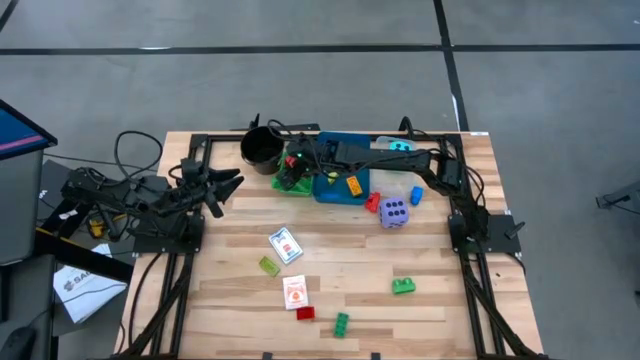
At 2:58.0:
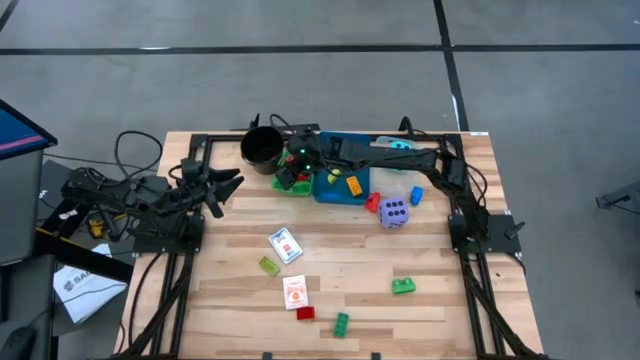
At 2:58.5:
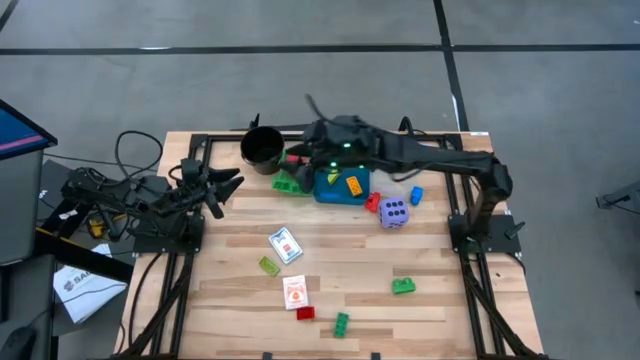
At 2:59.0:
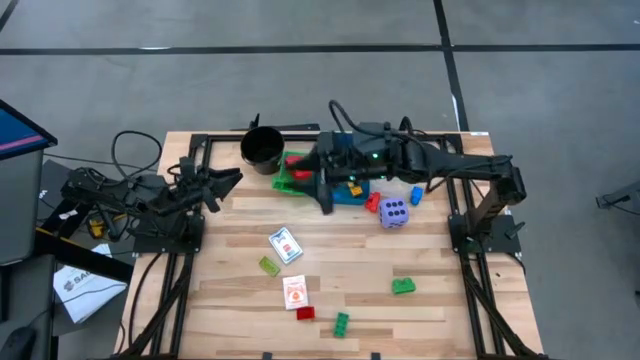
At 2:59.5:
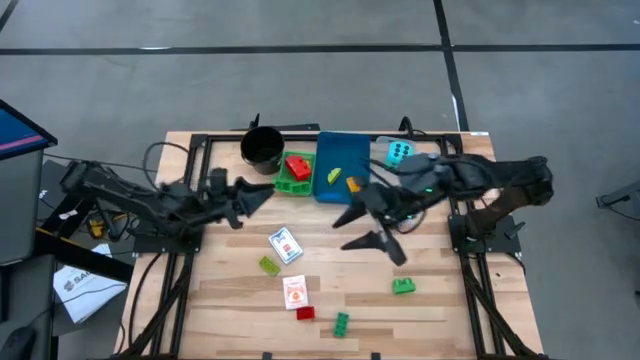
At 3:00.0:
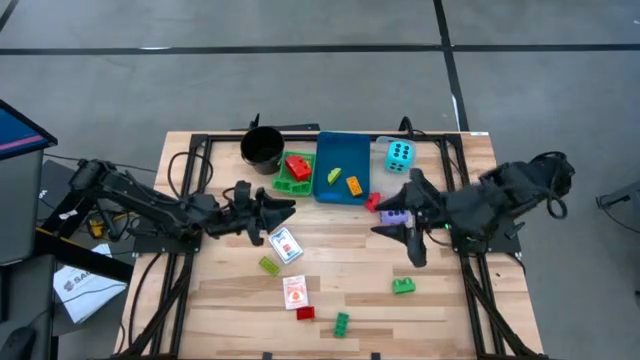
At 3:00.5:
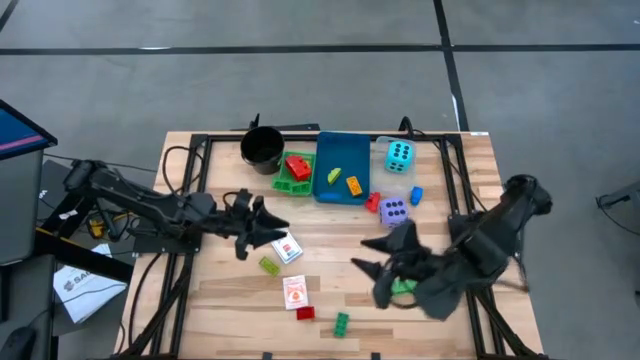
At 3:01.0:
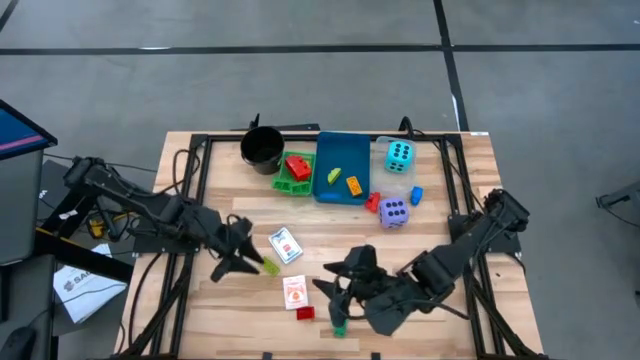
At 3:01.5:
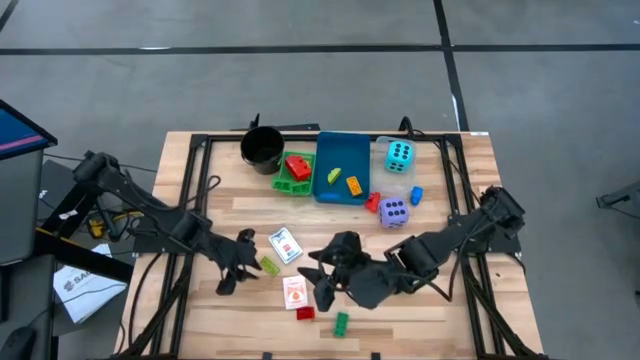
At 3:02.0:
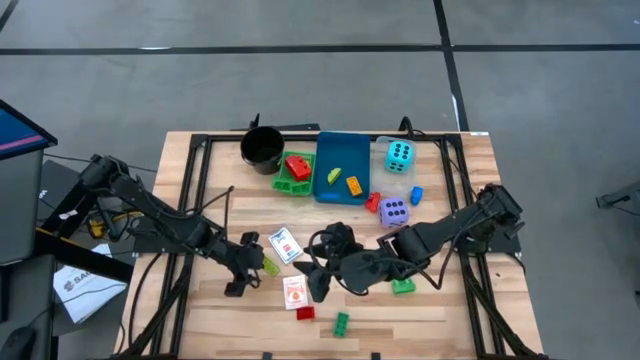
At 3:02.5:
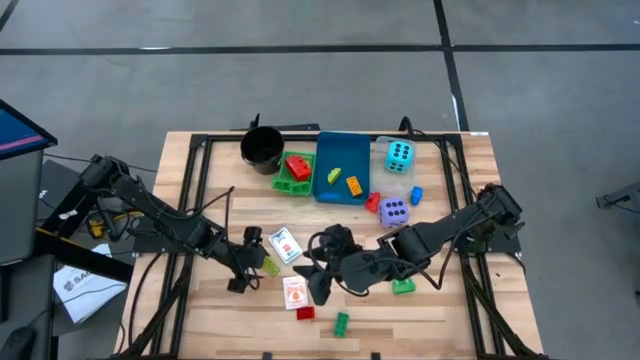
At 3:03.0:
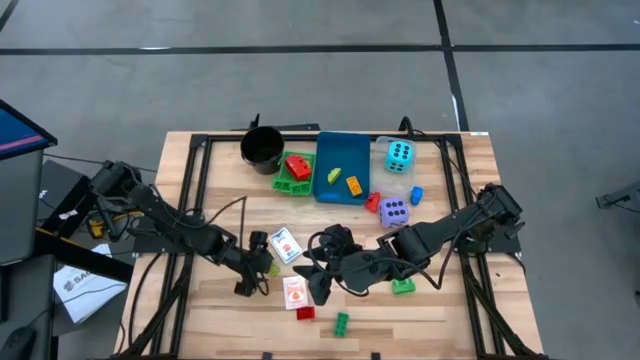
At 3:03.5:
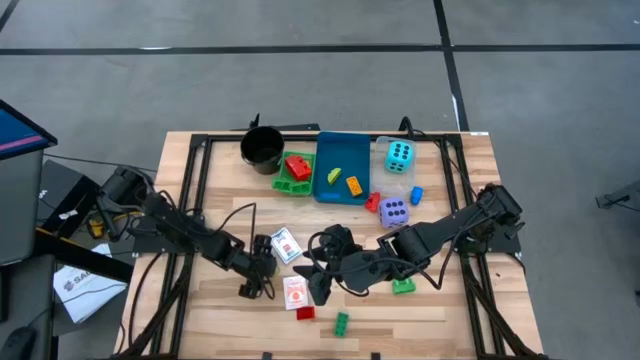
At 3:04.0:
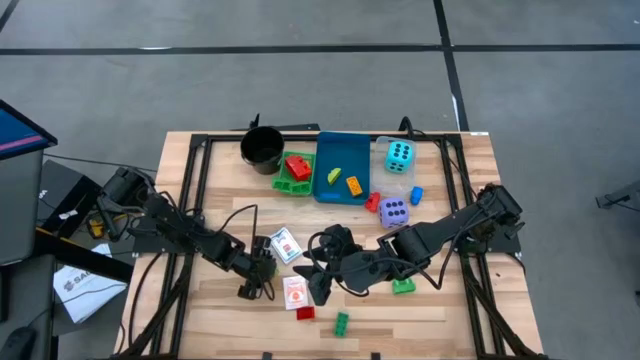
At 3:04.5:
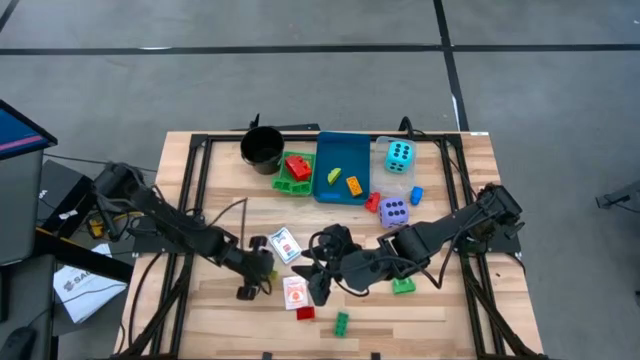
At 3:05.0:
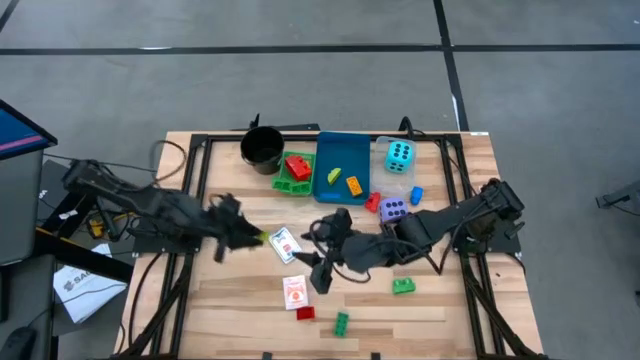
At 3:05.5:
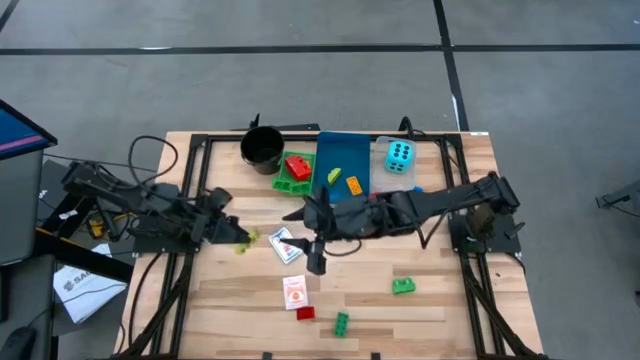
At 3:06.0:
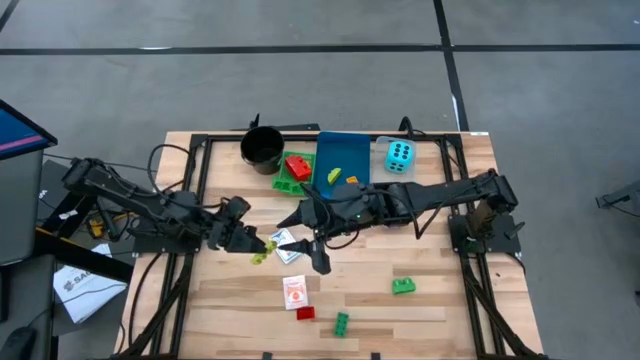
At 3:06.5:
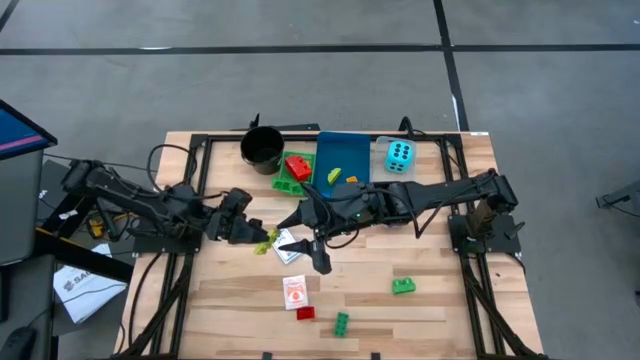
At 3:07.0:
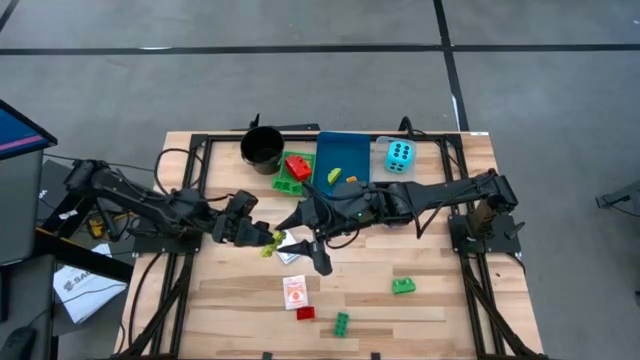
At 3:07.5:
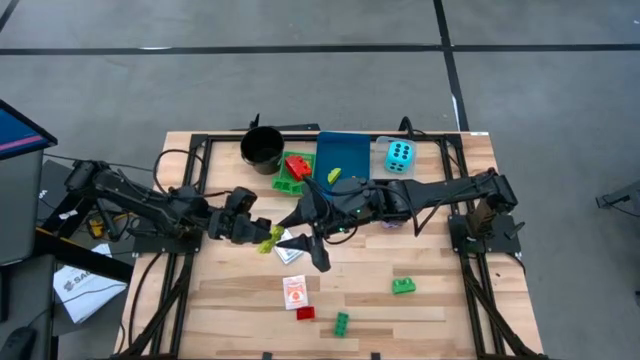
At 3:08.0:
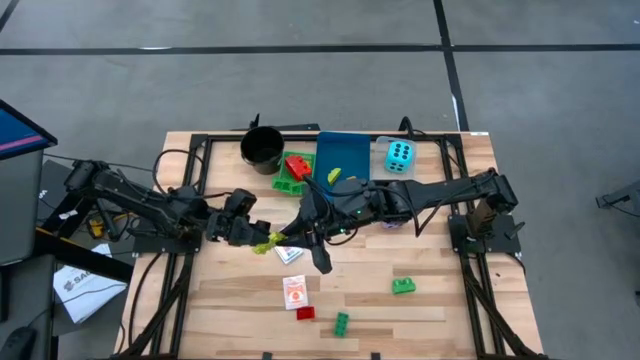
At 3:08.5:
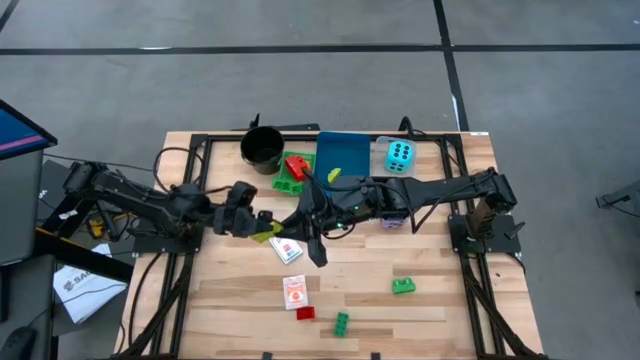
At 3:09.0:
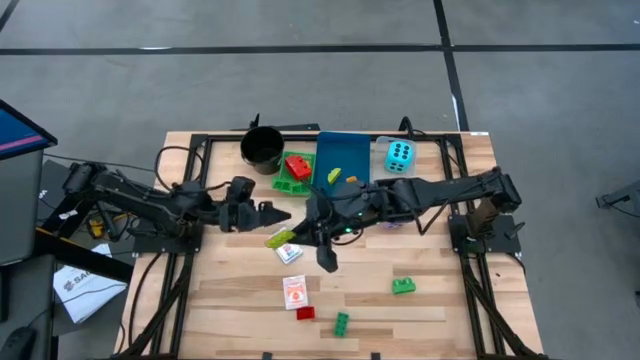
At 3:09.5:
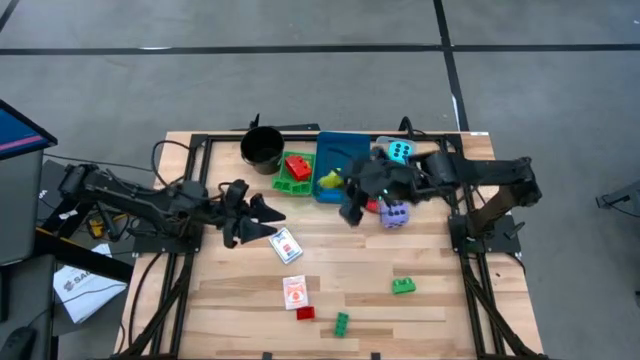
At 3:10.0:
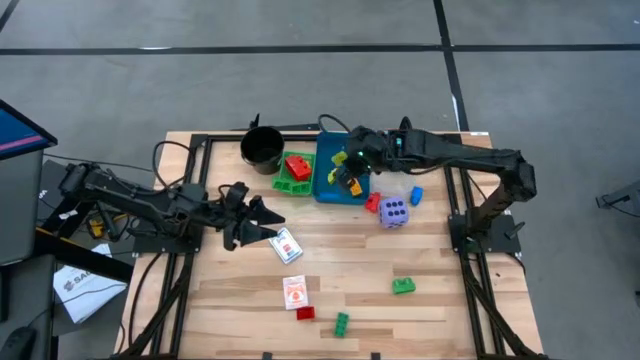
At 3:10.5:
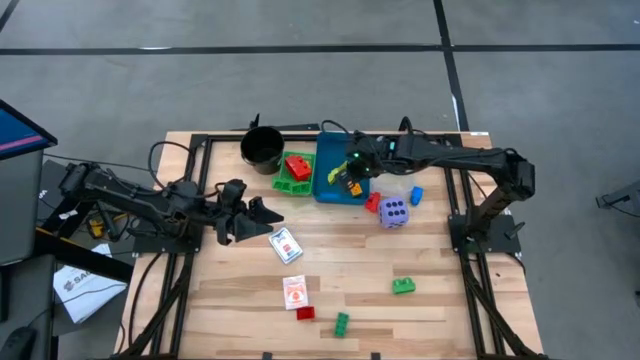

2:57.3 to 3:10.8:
Task: Pick & Place Toys
Put the small stud green game piece into the blue bin
